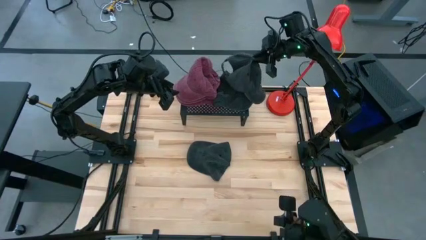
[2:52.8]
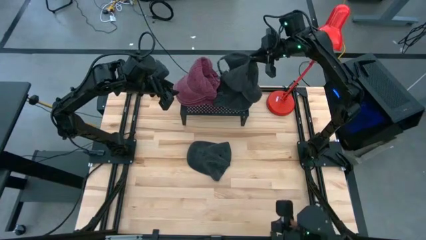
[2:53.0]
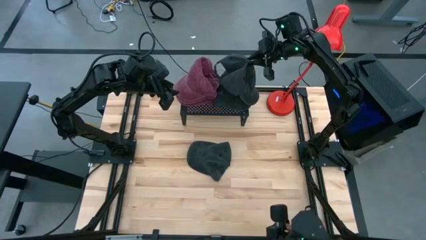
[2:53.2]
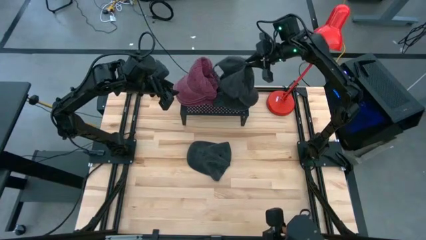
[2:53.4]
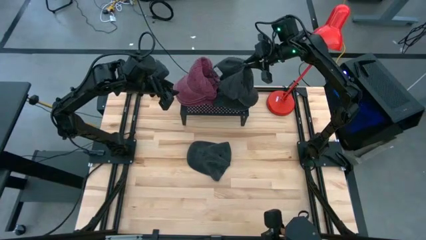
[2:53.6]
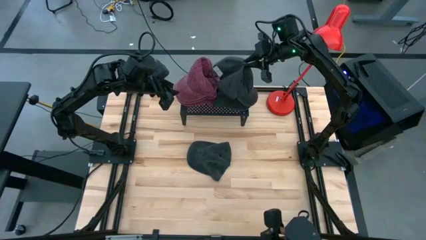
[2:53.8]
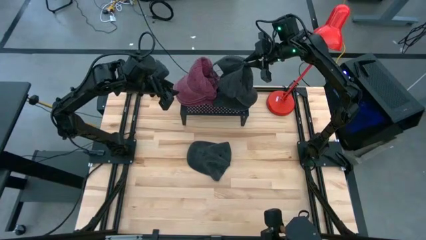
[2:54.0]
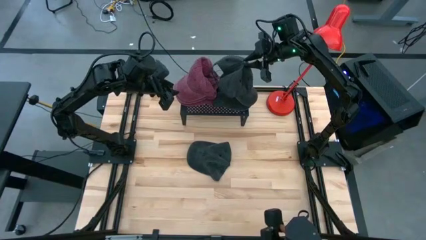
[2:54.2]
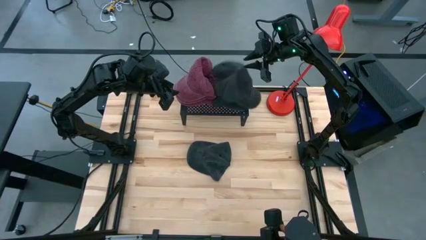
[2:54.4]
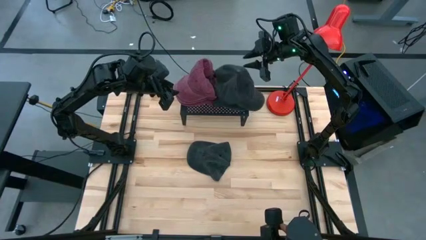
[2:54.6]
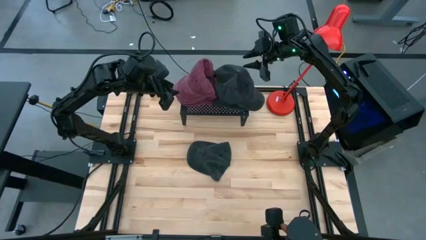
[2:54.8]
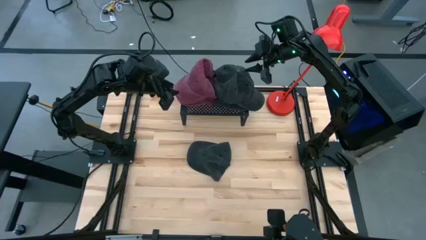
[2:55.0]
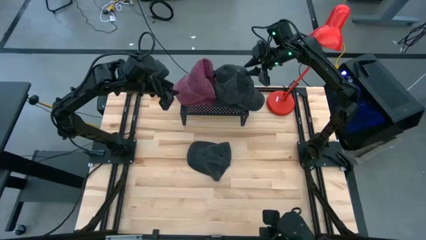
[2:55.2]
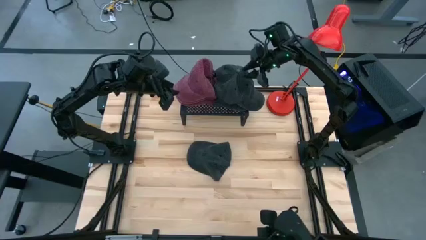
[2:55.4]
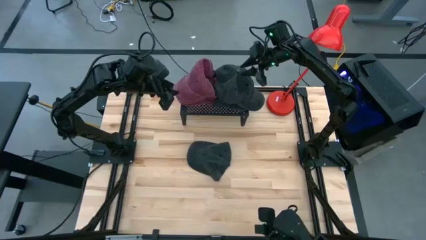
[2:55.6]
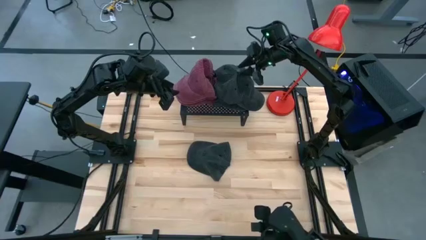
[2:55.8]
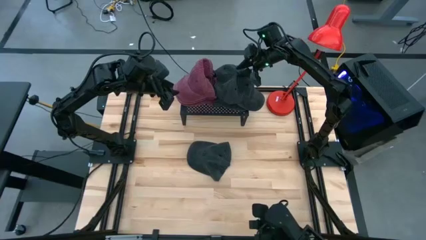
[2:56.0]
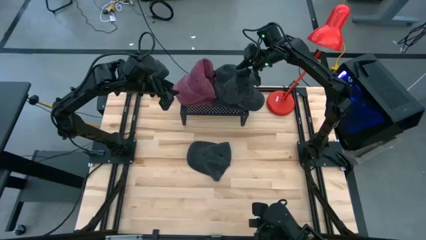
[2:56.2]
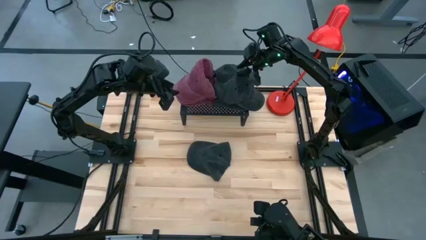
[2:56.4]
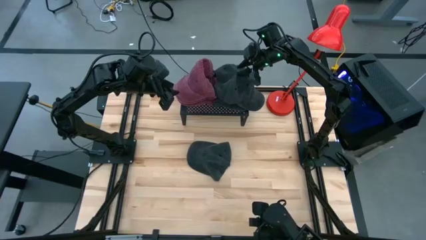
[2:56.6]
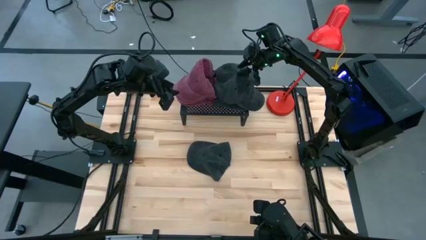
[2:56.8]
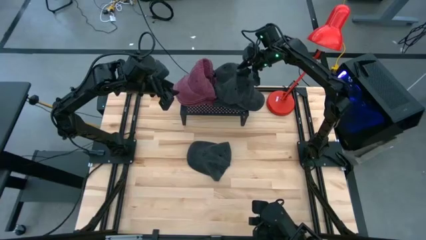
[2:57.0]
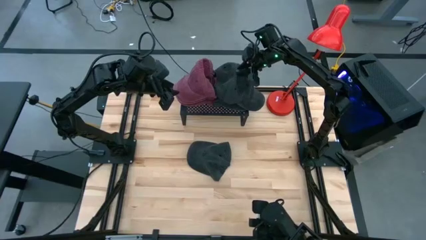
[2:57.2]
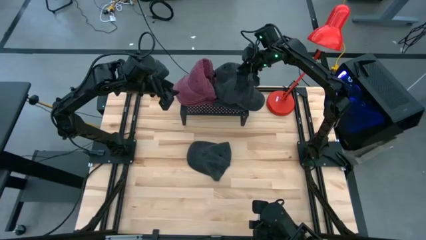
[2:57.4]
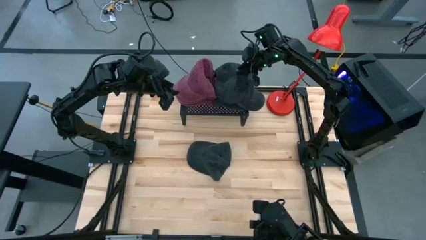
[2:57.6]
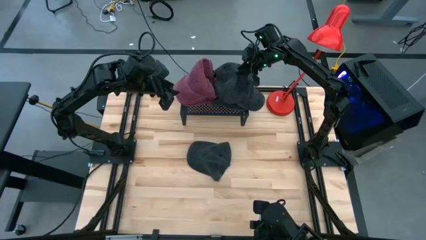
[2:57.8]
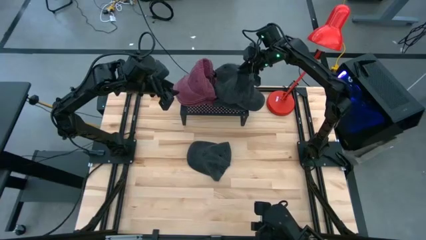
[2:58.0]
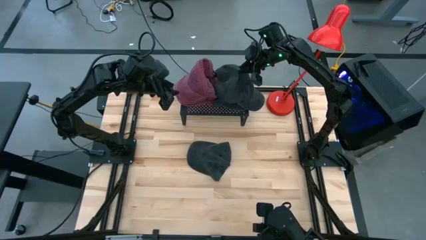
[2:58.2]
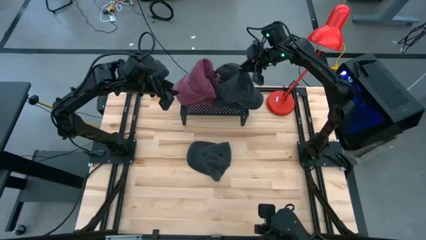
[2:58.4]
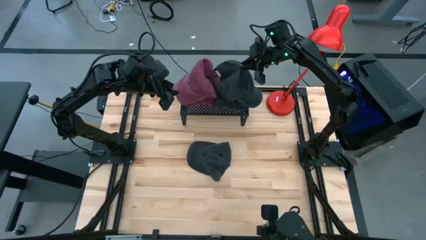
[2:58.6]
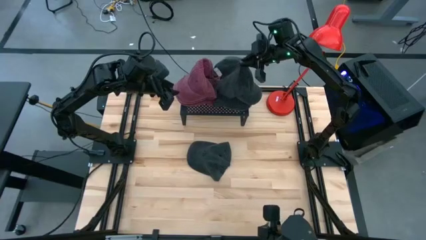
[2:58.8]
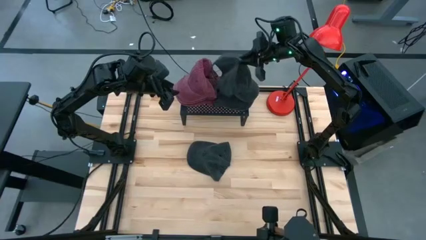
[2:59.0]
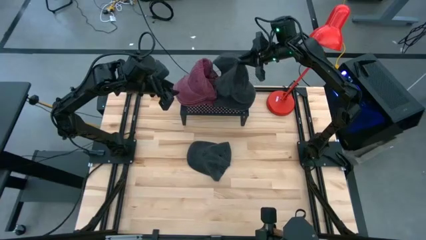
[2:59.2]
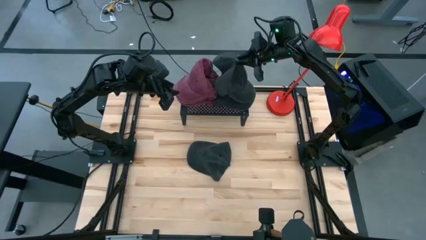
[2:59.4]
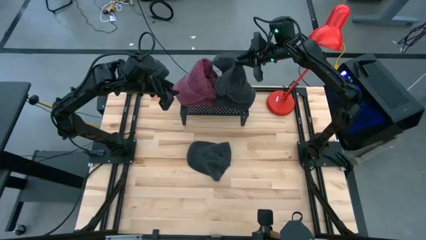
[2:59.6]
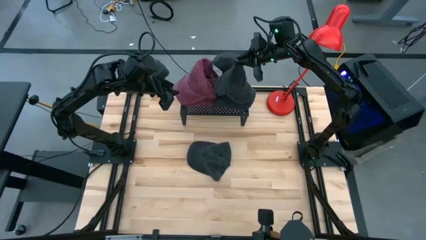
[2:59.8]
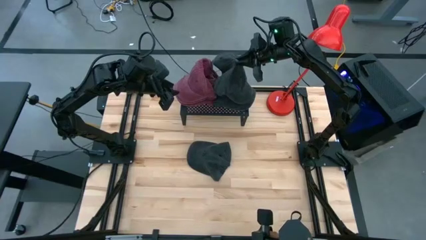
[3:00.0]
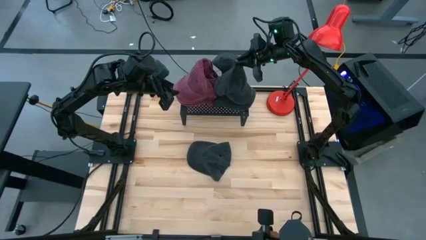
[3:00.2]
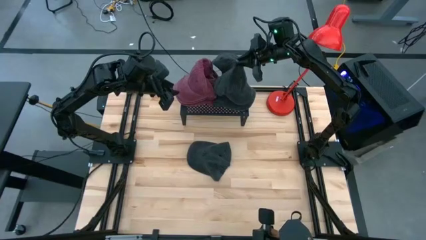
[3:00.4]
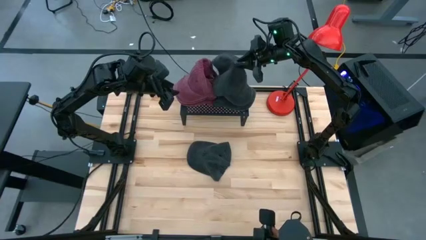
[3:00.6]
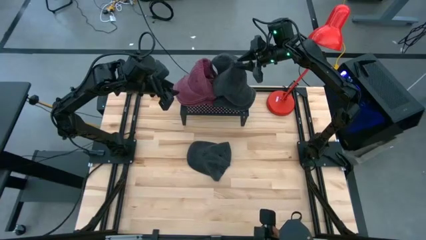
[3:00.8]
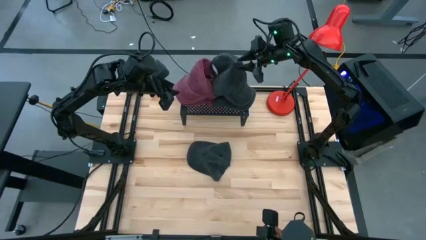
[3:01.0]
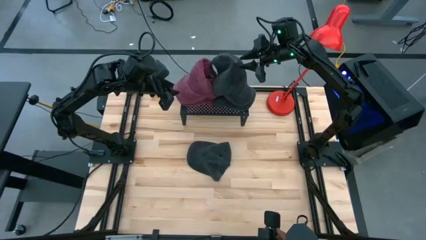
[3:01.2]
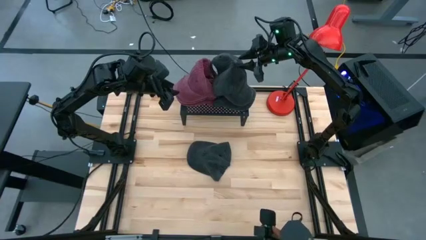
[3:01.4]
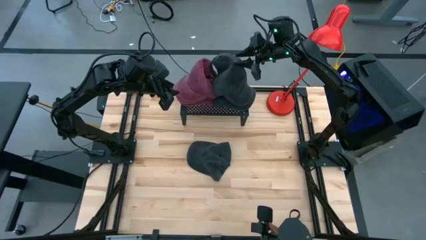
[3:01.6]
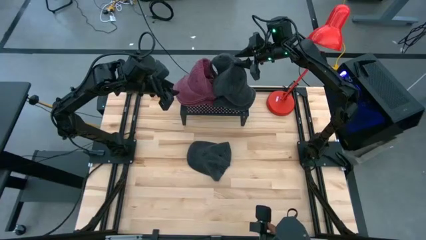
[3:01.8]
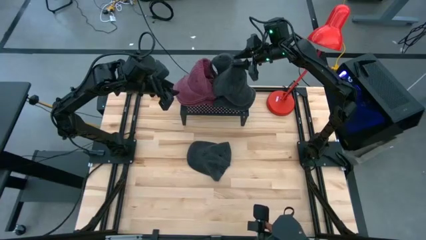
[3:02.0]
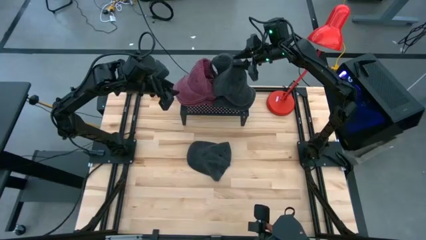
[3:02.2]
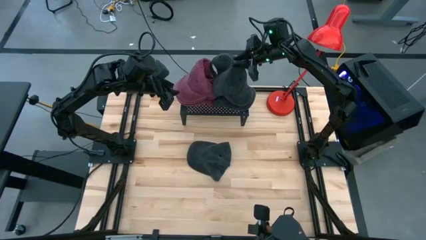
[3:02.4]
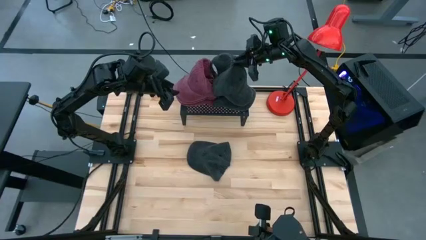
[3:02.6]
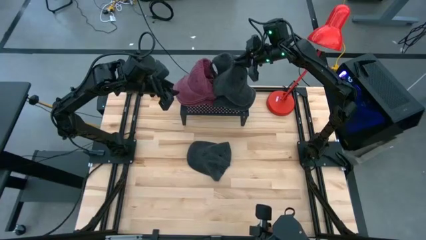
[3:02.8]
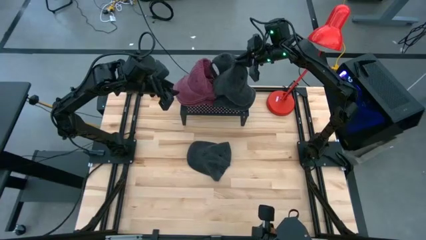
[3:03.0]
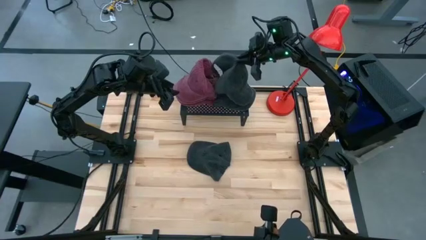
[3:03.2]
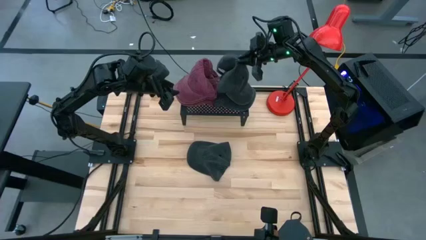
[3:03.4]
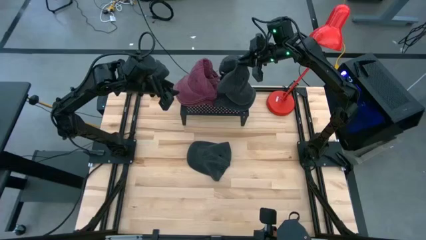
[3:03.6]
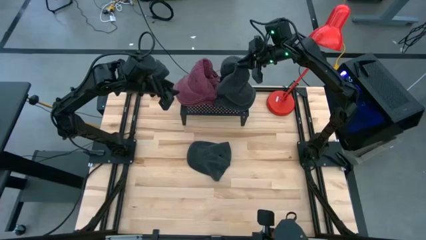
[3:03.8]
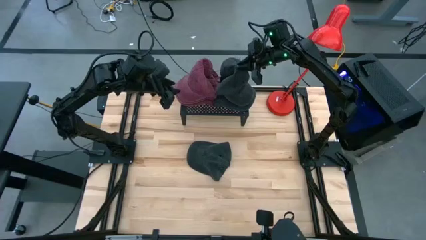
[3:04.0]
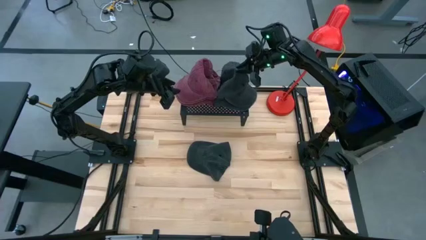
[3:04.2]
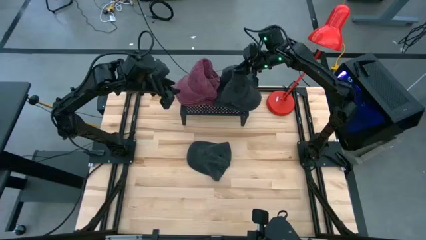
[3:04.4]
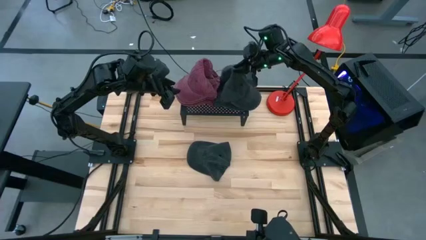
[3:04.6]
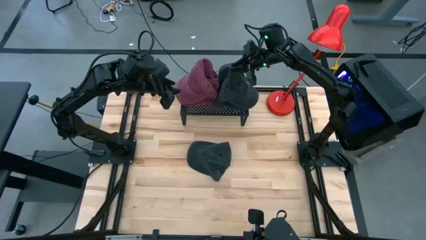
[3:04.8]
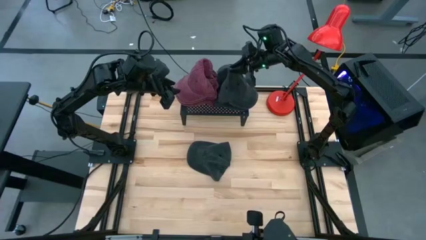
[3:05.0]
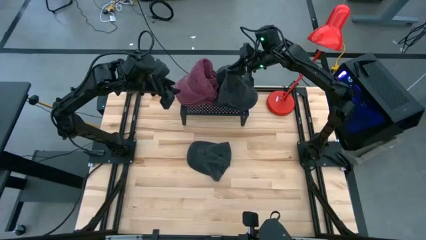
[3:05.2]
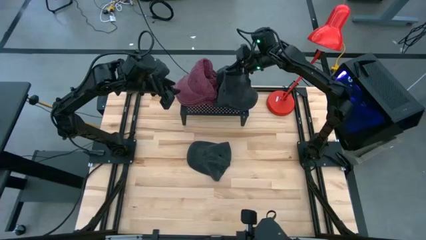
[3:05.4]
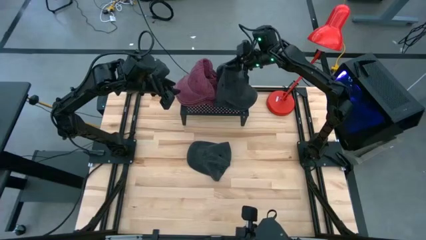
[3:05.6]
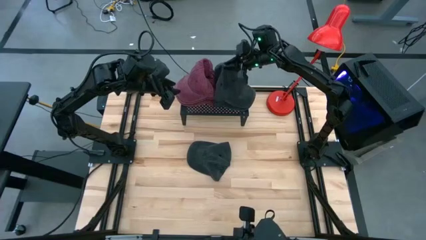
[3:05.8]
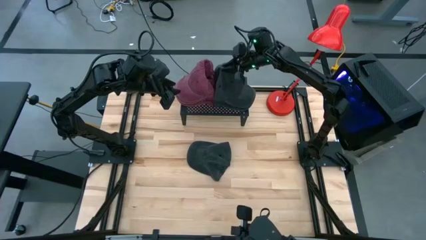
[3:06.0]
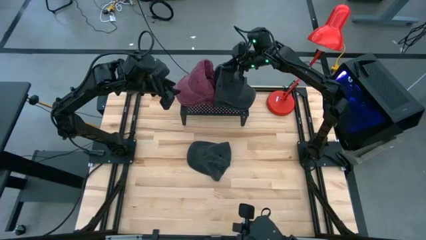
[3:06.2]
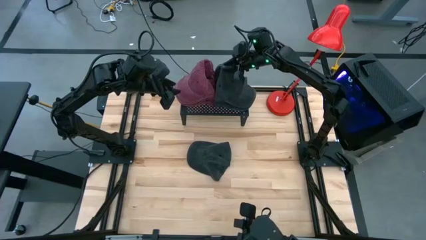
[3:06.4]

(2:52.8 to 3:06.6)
Task: Pick & Place hat
Put the left black cap on top of the black cap on the shelf

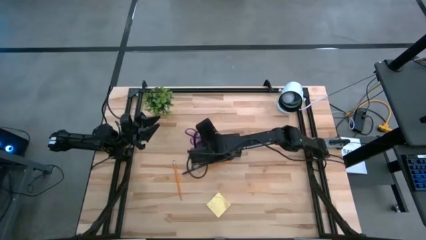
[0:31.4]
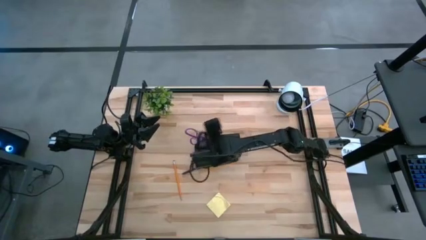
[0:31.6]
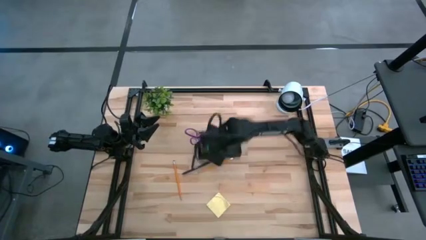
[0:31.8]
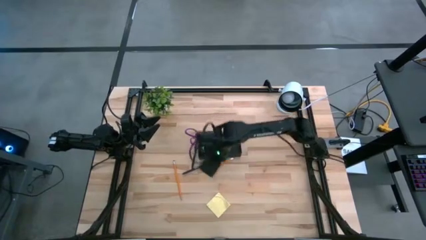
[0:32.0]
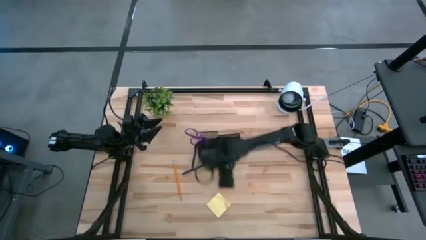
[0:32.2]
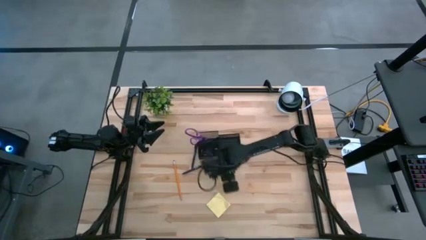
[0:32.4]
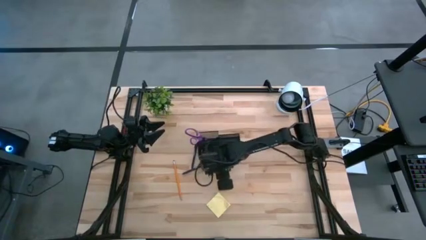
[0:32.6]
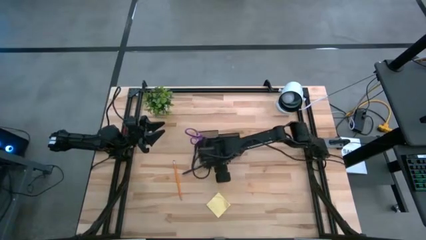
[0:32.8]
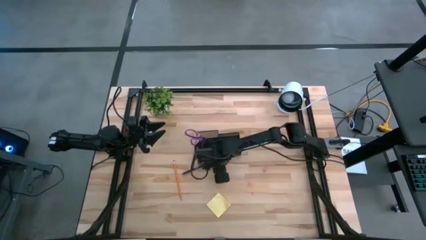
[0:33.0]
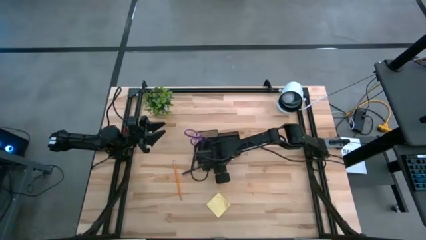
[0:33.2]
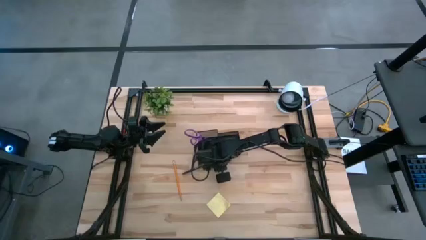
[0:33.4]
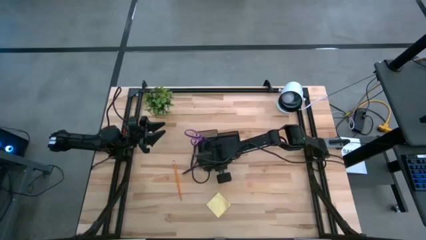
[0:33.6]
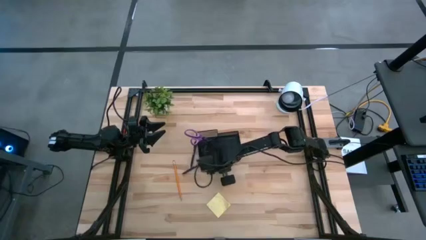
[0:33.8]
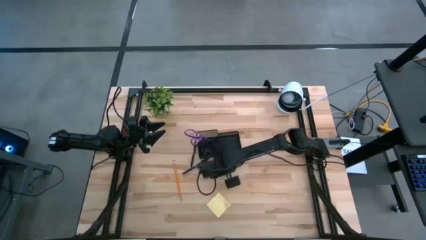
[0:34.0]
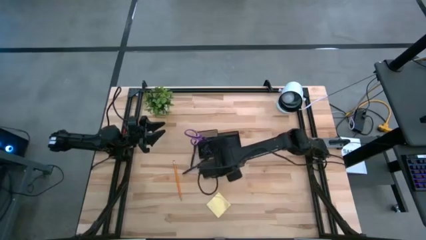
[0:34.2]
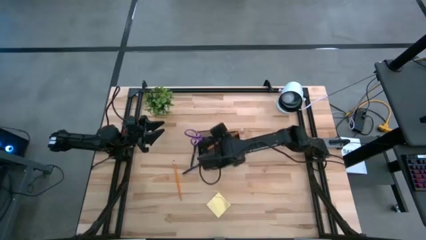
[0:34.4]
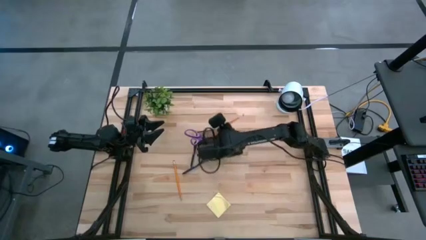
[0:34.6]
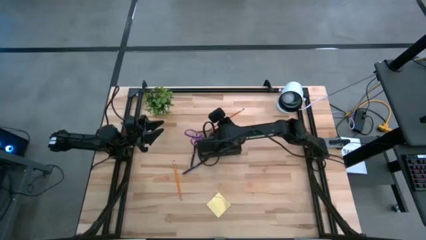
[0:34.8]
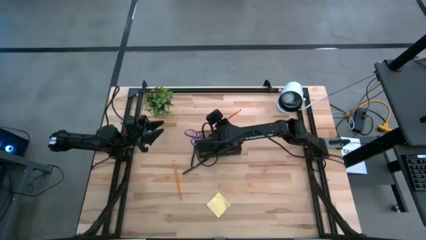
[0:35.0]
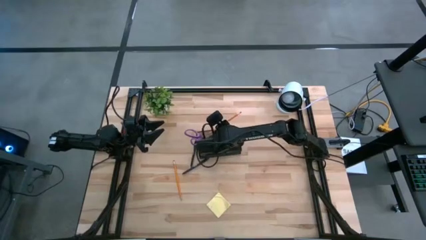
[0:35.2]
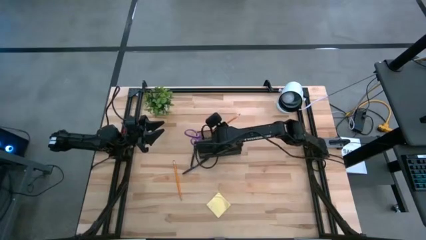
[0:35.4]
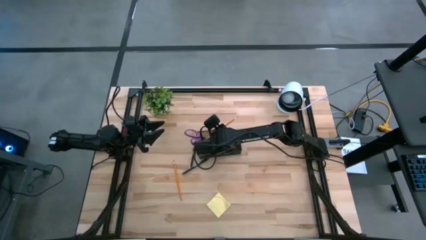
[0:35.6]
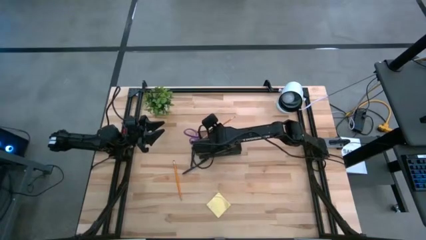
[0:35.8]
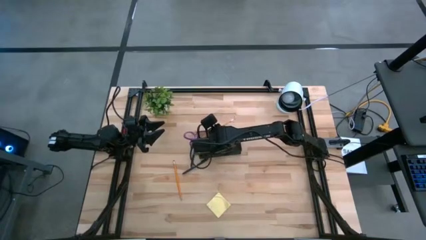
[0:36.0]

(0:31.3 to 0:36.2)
Task: Pick and place office supplies into organizer
Put the right orange pencil into the black desk organizer
